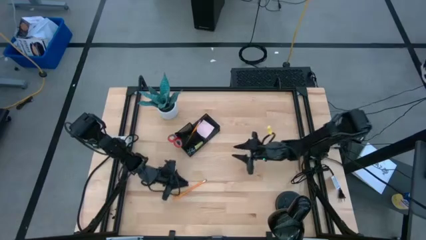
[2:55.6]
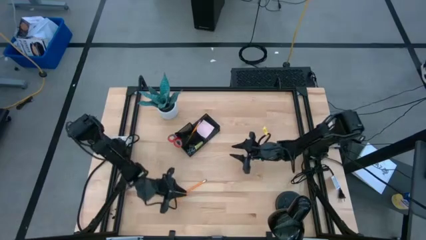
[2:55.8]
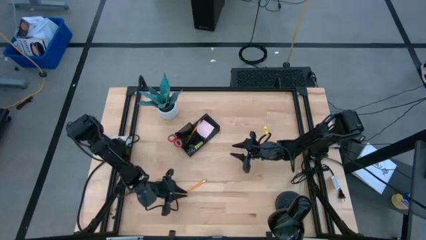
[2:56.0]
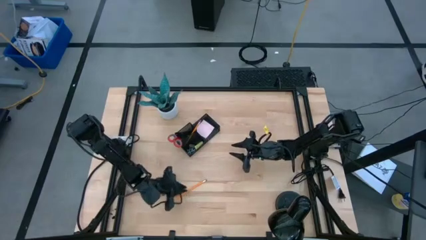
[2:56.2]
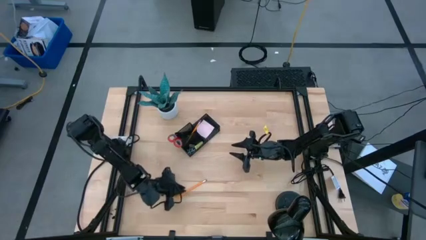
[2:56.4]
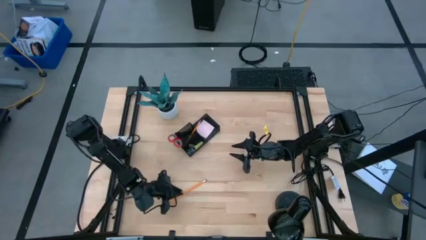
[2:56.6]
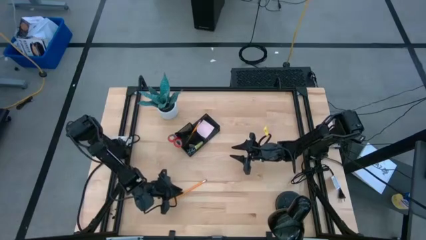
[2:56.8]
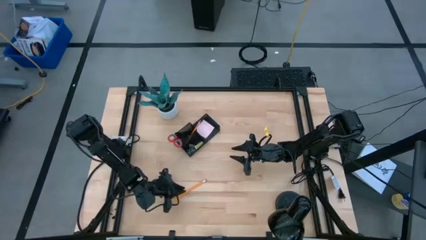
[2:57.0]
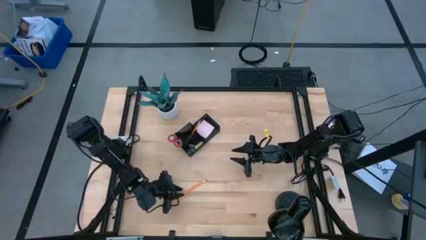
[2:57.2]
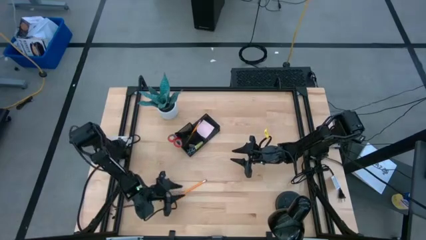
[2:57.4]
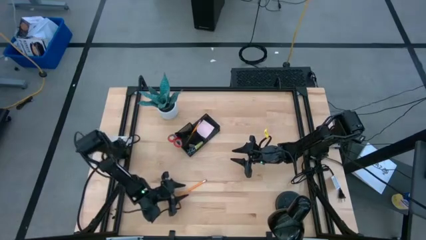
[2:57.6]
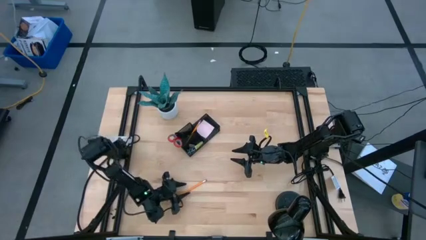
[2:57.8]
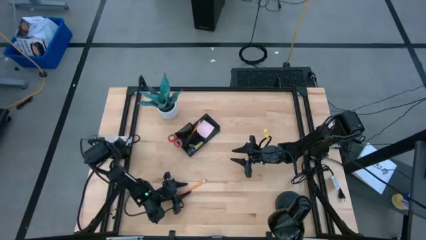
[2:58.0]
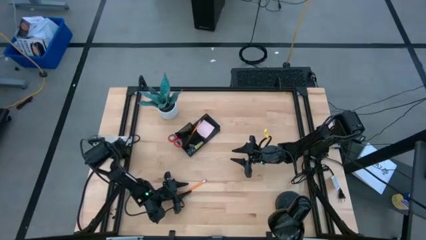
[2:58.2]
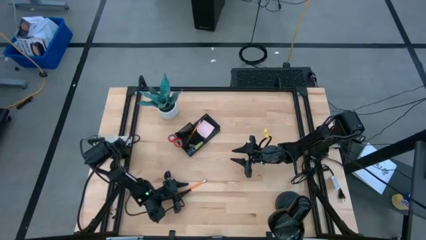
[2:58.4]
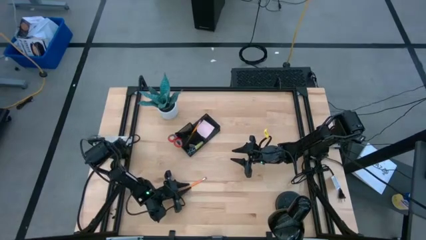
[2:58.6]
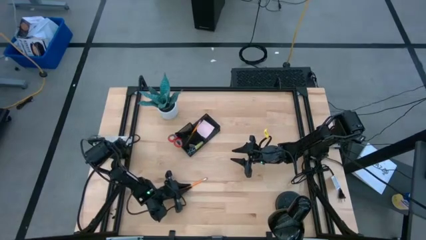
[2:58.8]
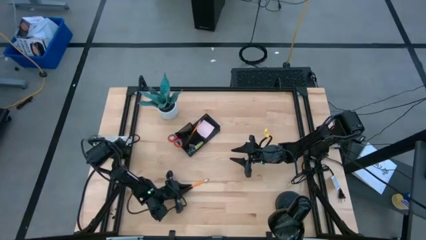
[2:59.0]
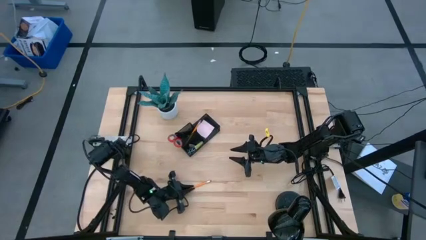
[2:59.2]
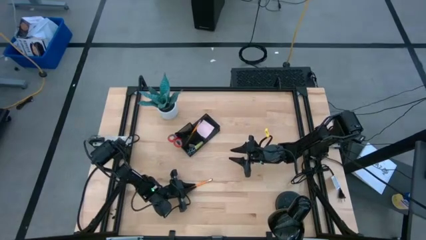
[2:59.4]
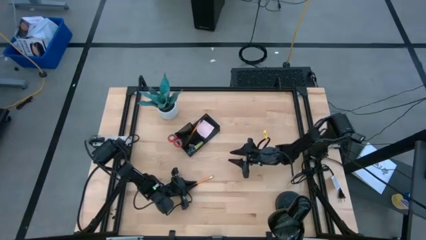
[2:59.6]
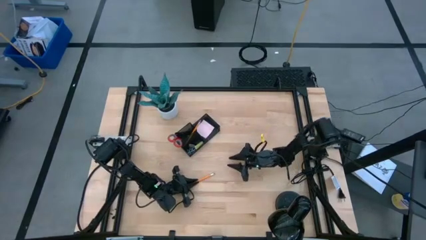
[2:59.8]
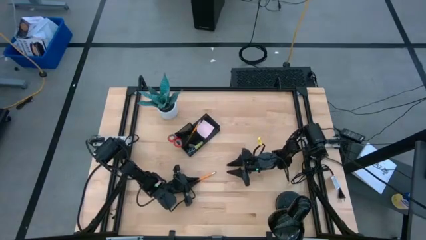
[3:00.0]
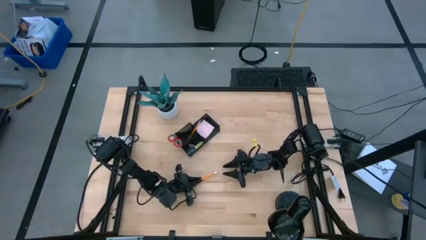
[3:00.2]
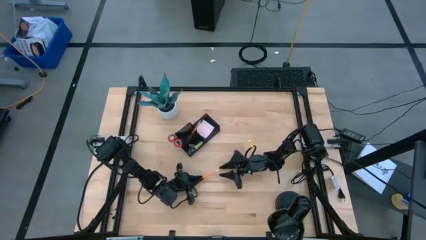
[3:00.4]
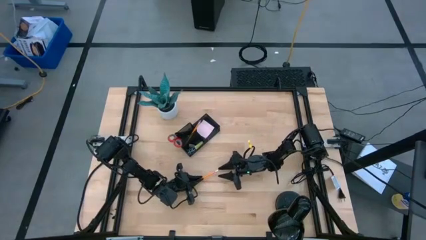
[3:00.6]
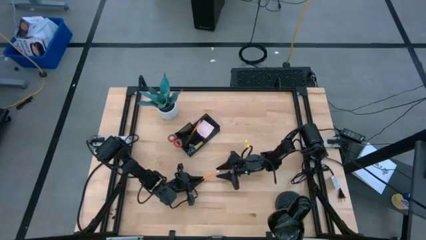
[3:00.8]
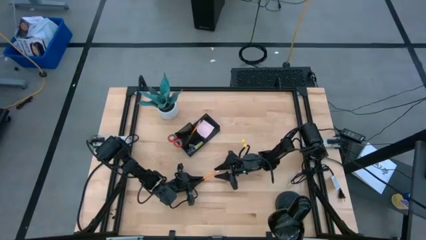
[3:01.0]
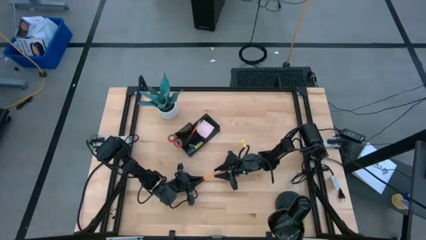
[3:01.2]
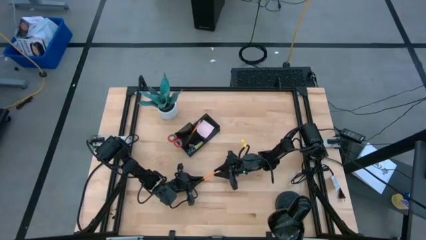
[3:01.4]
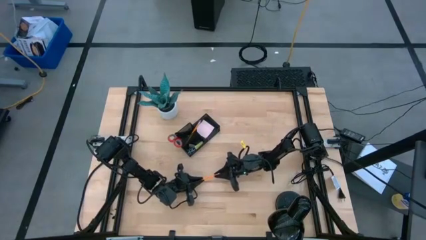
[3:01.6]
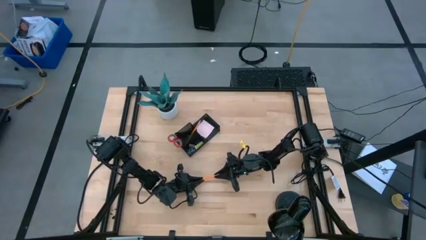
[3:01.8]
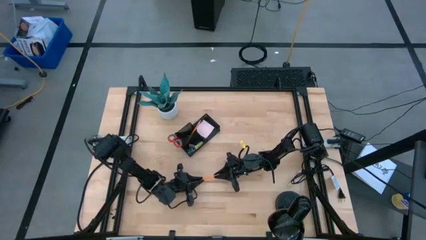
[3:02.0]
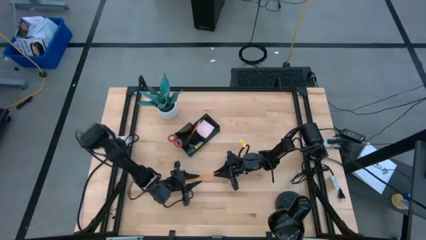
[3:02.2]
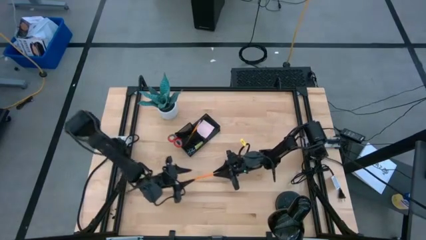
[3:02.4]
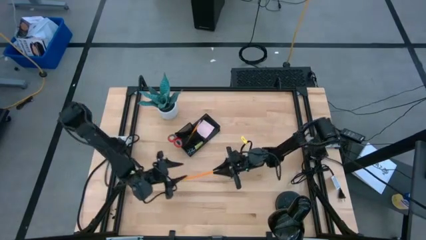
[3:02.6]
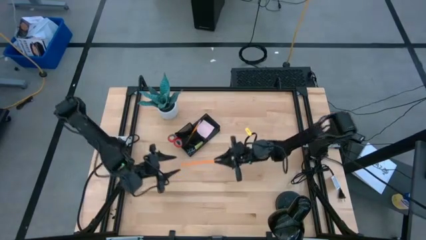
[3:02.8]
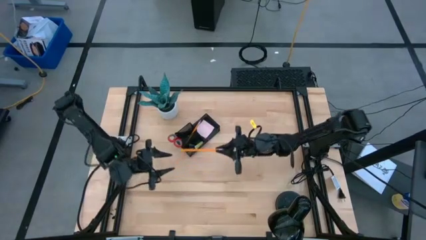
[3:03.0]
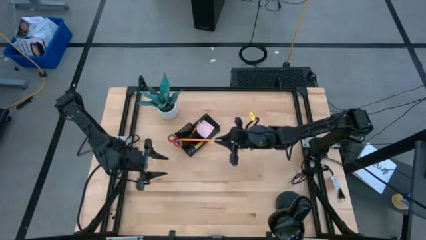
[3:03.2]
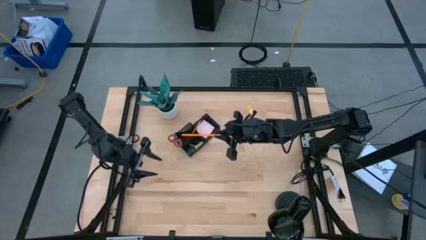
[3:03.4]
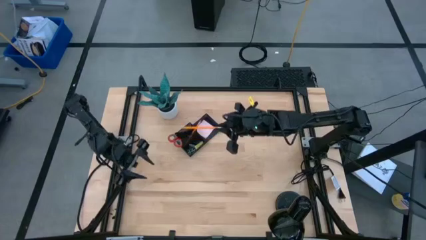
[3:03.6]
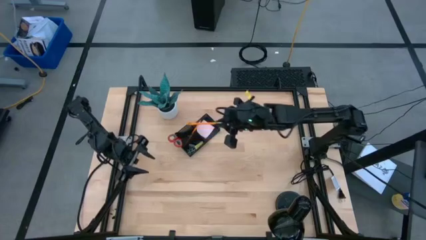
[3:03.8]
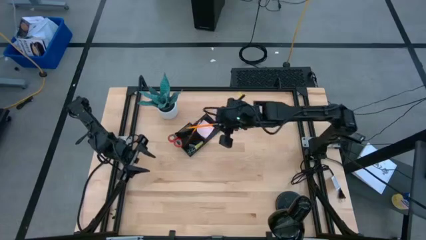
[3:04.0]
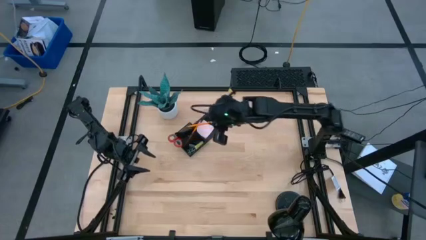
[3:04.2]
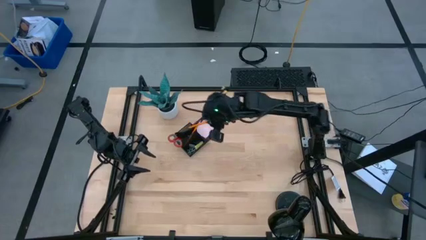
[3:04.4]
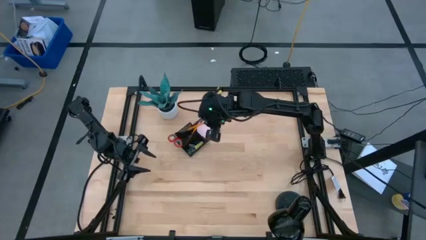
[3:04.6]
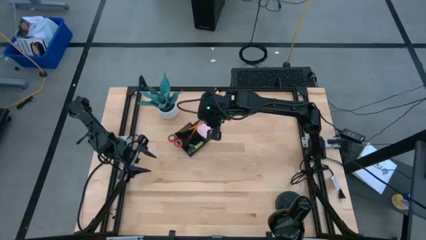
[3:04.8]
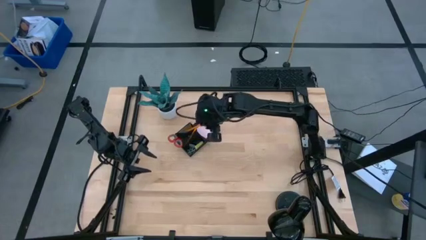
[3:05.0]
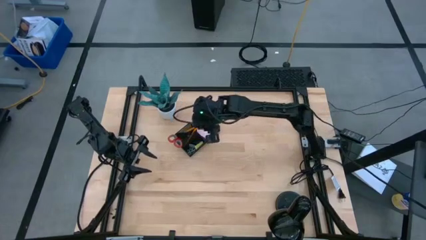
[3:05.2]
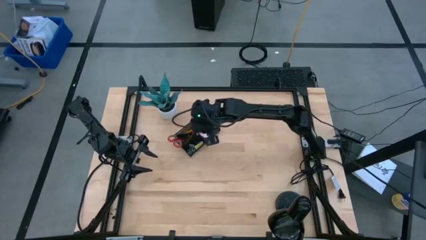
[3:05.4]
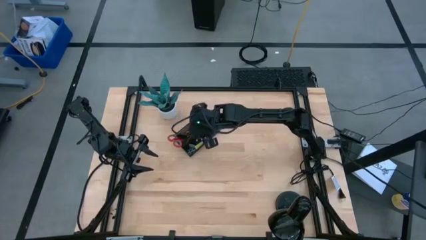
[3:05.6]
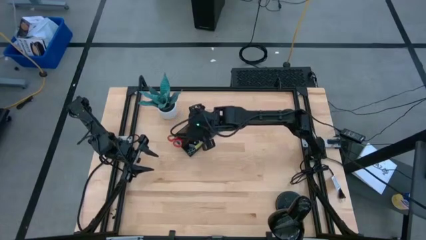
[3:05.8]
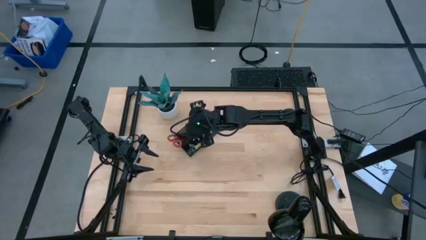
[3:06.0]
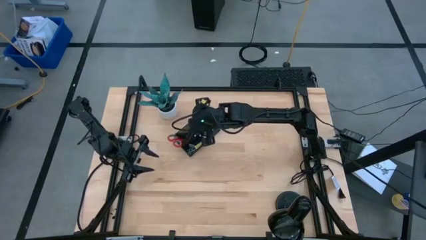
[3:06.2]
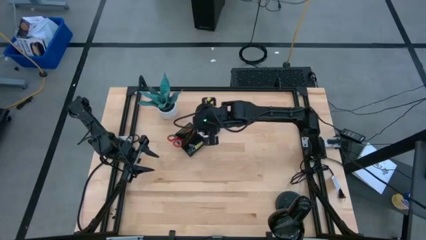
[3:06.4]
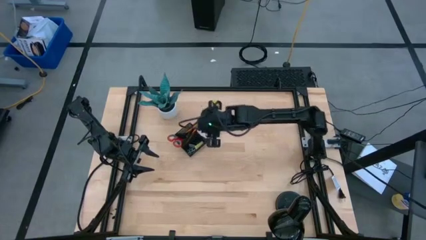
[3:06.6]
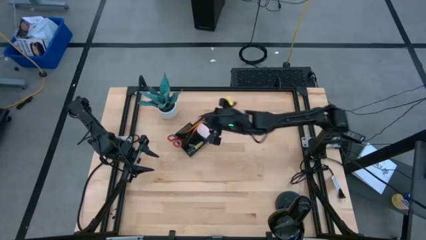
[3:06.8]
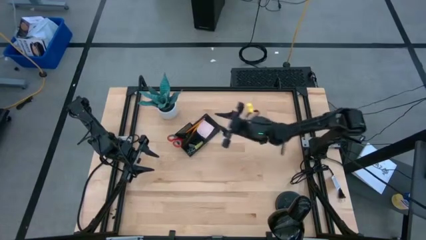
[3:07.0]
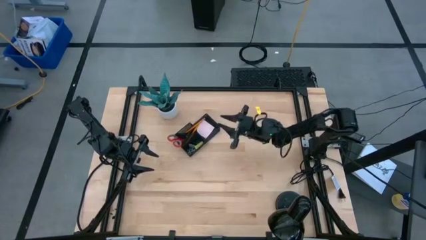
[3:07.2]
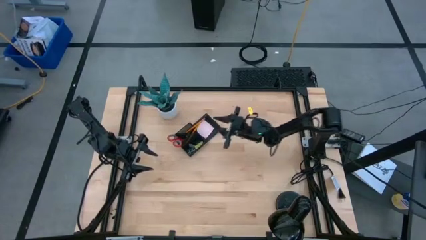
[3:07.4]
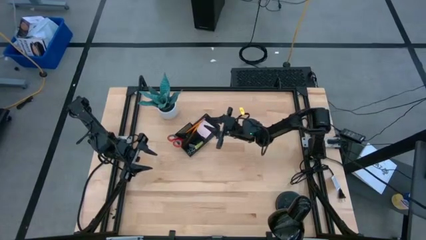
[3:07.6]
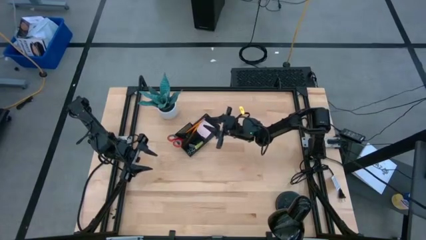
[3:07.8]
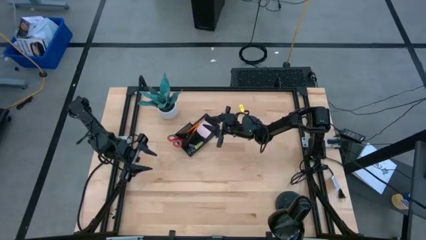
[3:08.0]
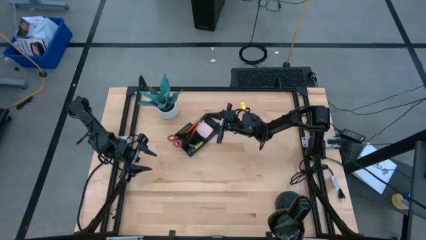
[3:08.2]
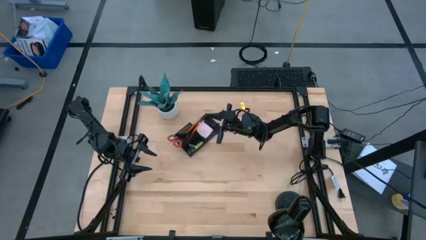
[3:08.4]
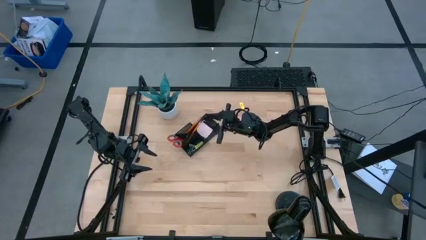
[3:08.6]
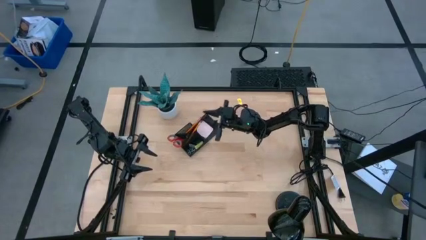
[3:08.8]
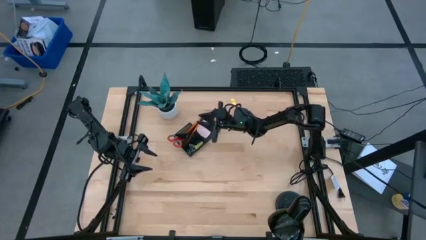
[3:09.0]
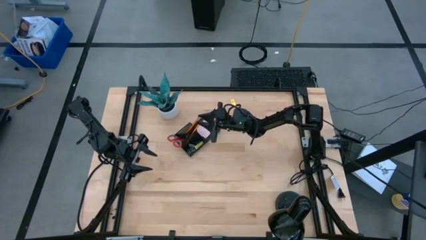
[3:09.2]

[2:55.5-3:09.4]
Task: Pick and place office supplies into organizer
Put the orange pencil into the black desk organizer

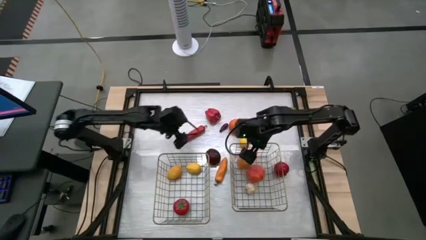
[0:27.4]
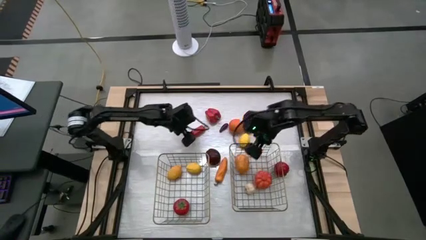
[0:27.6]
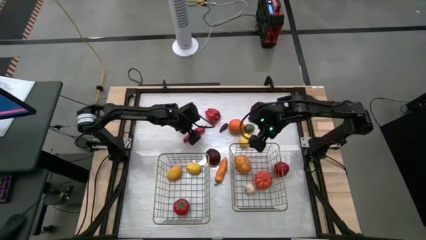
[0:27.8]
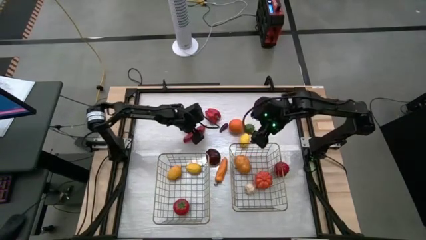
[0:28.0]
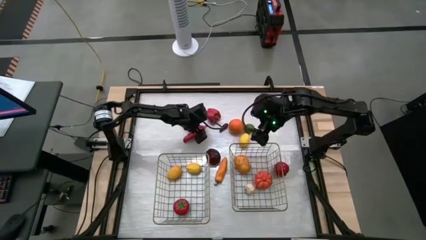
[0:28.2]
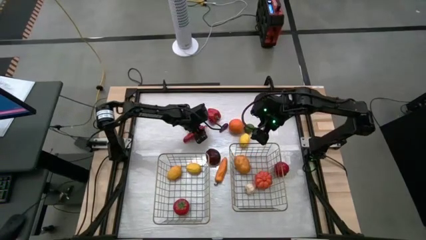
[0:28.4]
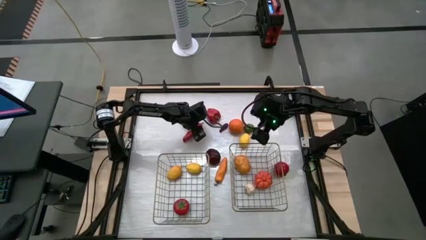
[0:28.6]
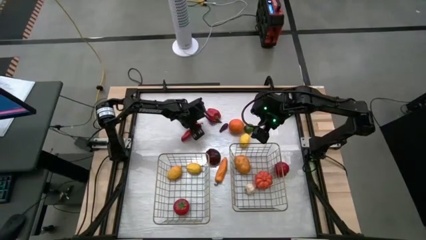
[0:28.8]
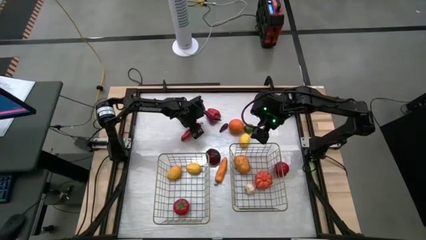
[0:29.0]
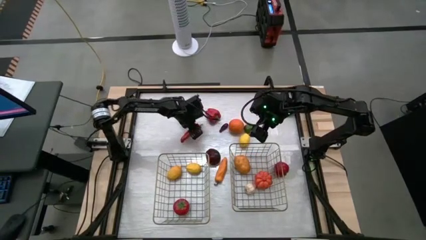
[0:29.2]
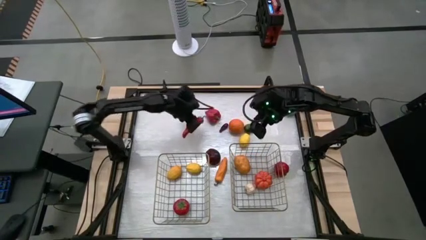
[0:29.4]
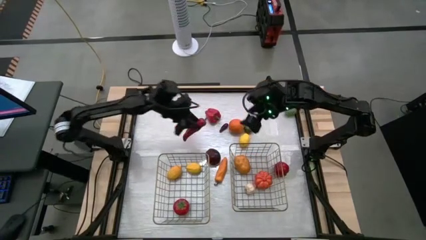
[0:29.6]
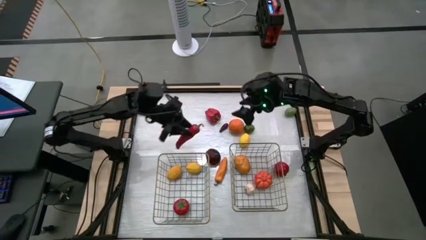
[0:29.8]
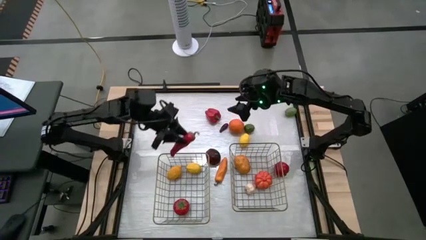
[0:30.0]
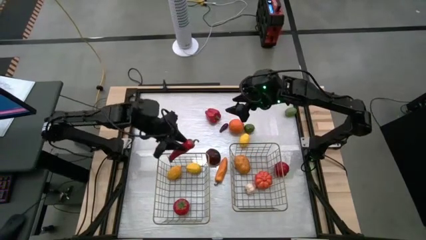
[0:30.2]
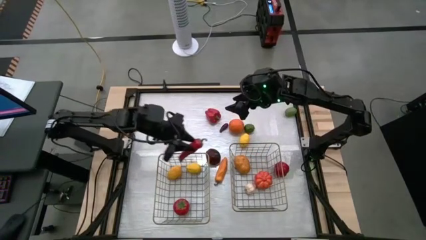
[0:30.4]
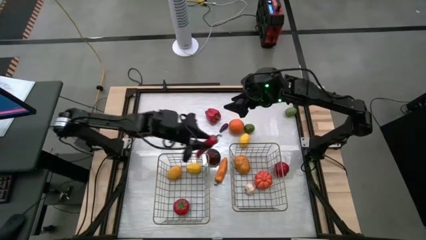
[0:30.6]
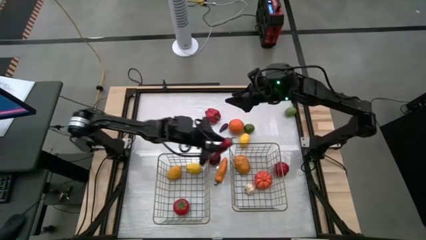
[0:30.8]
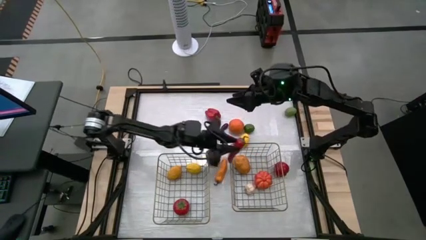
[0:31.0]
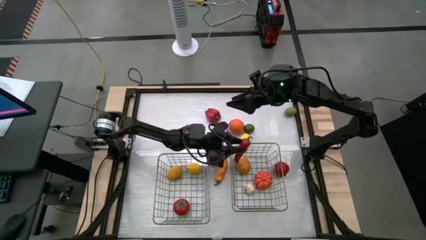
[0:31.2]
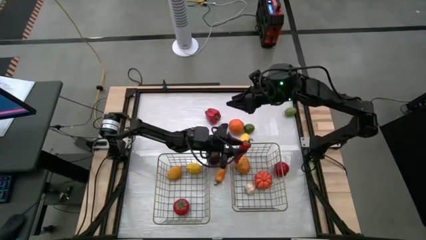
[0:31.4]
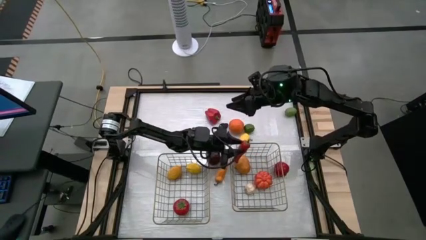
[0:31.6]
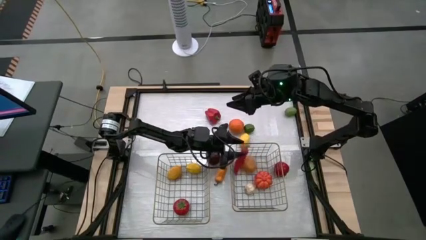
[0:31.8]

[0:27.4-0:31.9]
Task: Sort produce into baskets
Put the red chili pepper into the right brown wire basket
